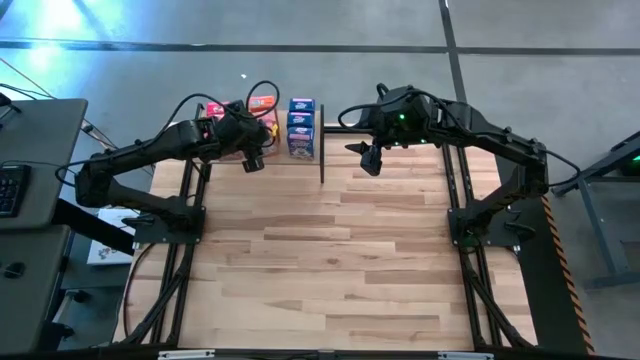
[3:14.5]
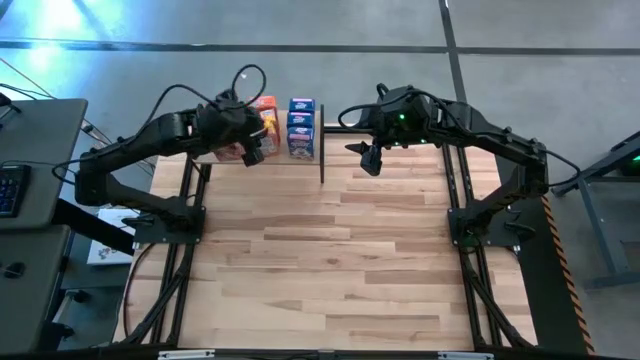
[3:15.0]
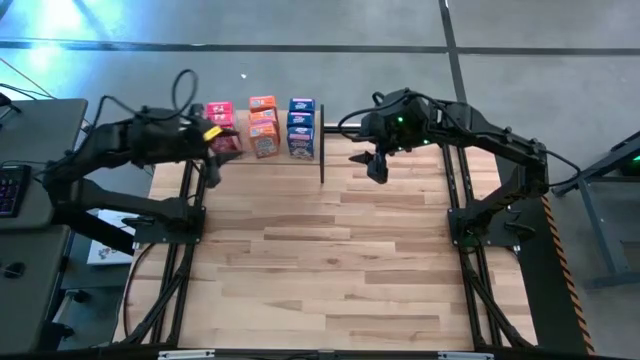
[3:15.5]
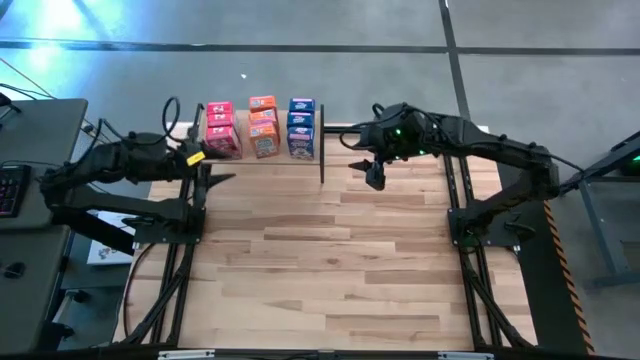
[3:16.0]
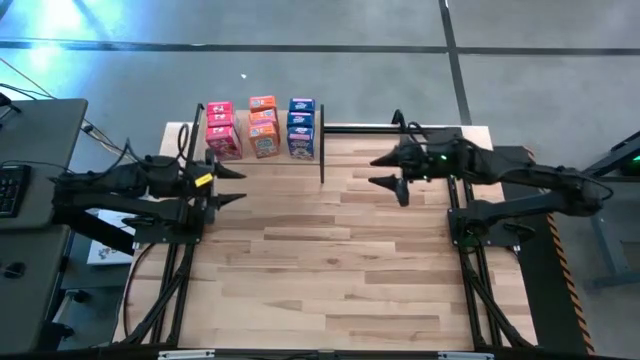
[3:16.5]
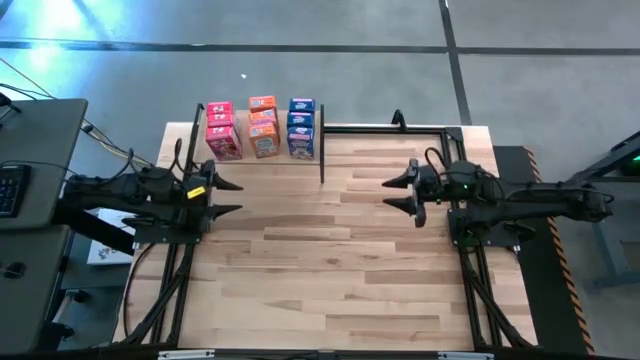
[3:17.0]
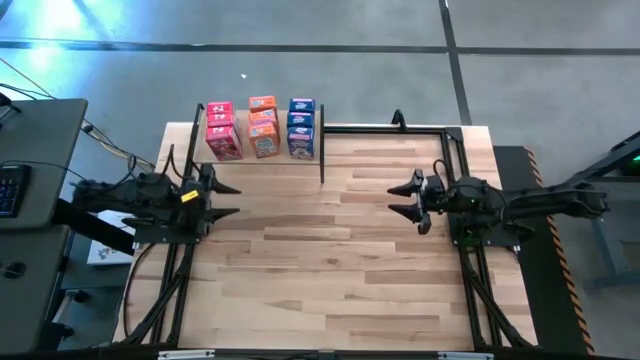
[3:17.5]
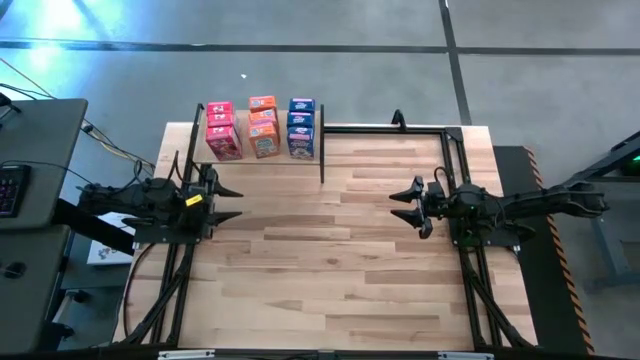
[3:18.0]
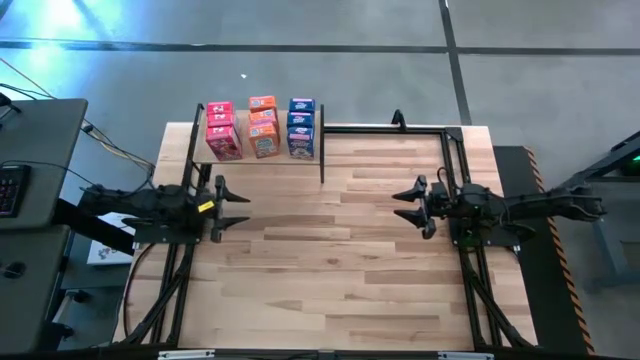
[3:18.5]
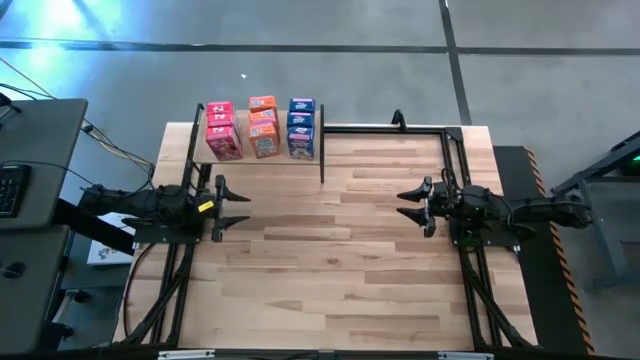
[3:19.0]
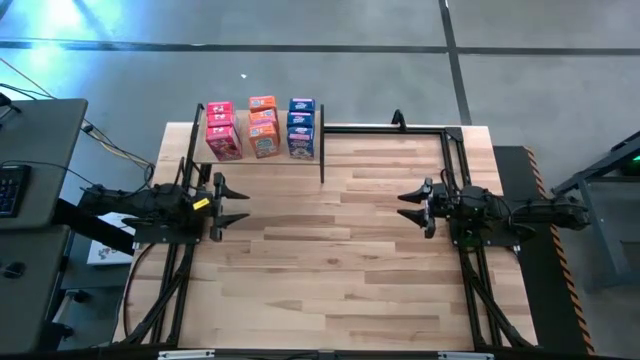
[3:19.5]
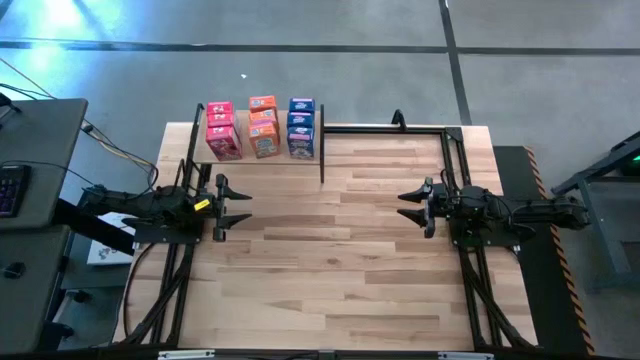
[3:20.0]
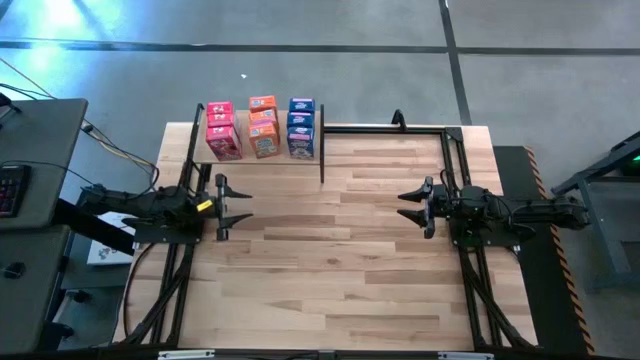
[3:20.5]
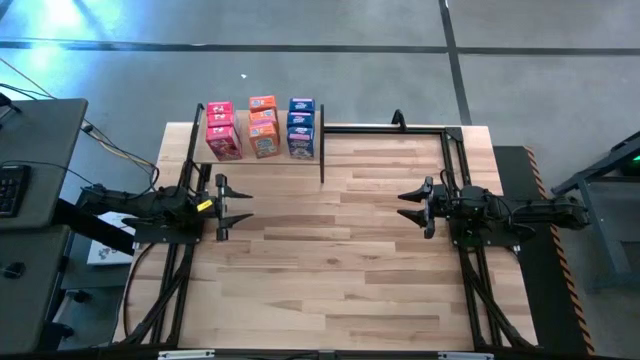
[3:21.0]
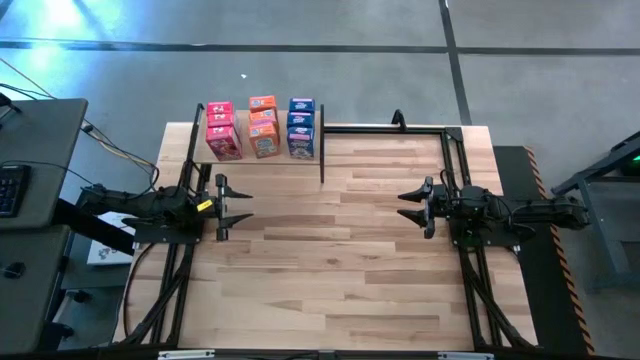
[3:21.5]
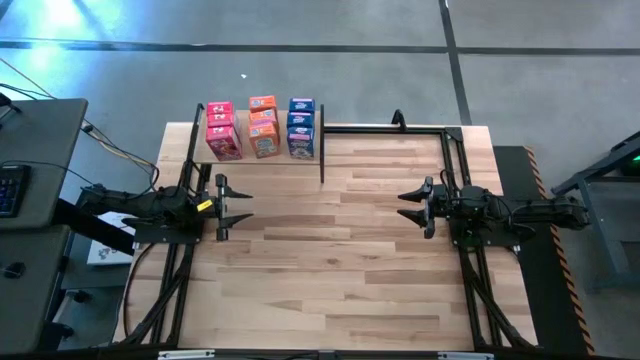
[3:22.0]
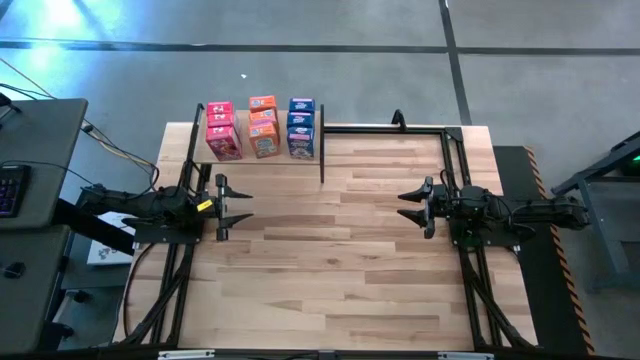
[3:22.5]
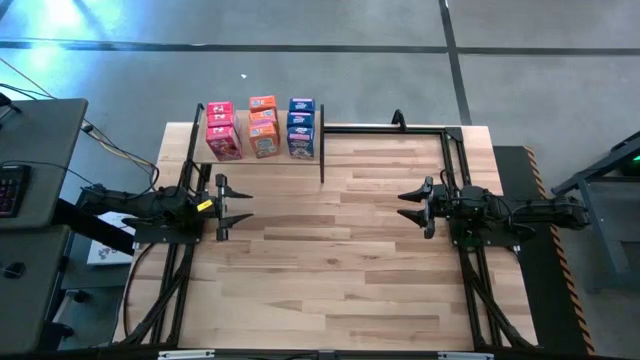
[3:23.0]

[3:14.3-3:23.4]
Task: Stack cereal on shelf
Return to Home Position

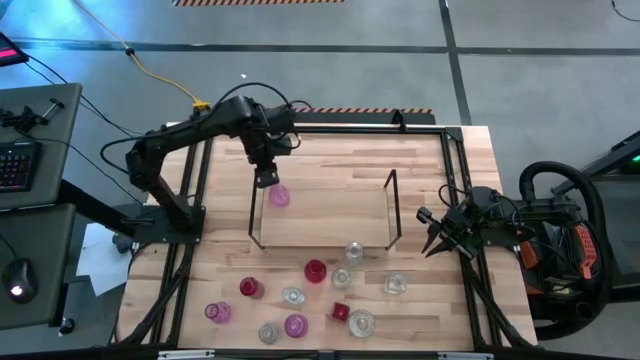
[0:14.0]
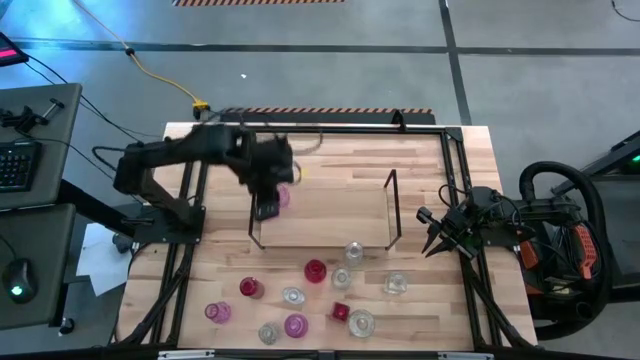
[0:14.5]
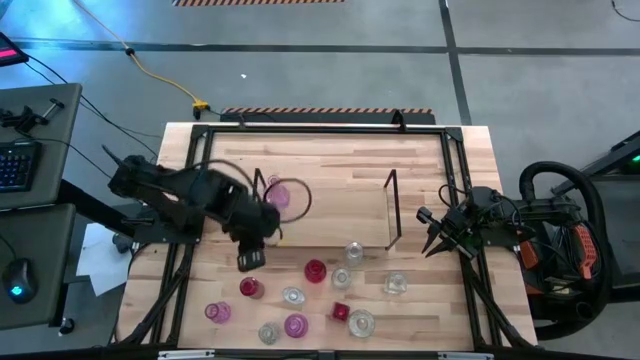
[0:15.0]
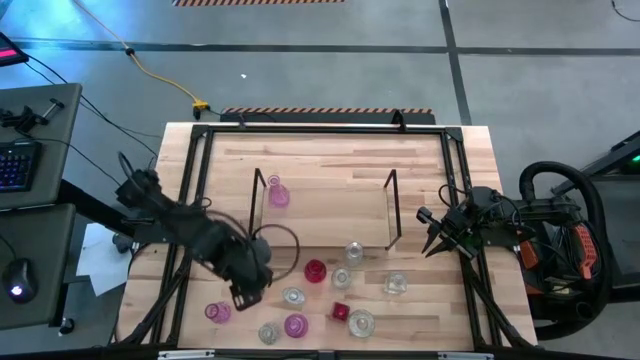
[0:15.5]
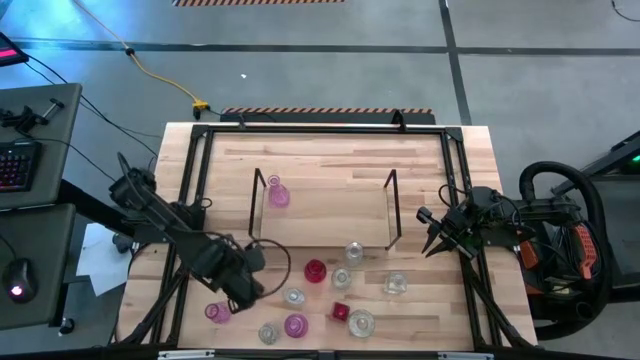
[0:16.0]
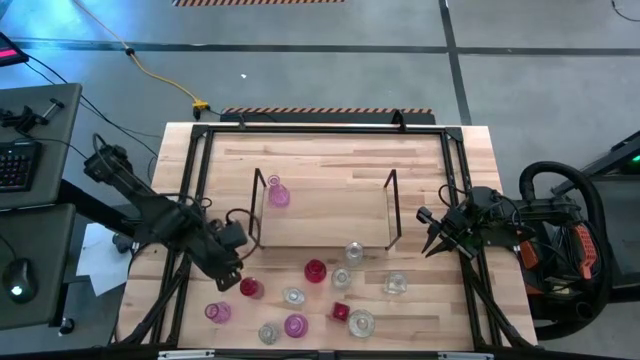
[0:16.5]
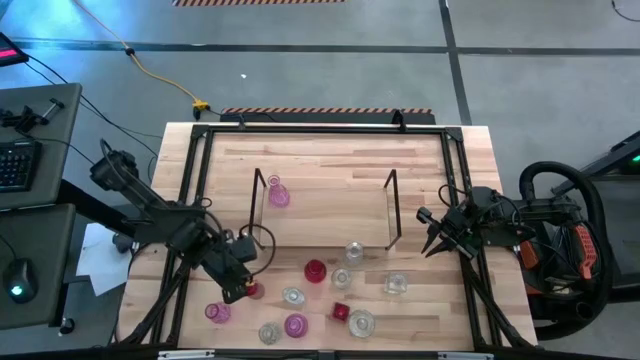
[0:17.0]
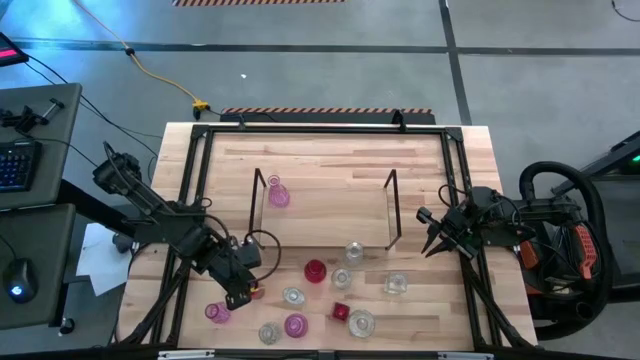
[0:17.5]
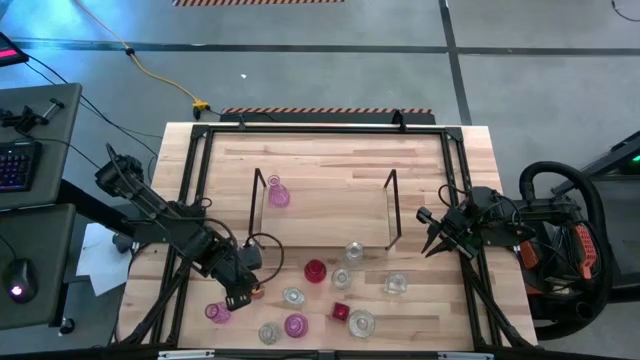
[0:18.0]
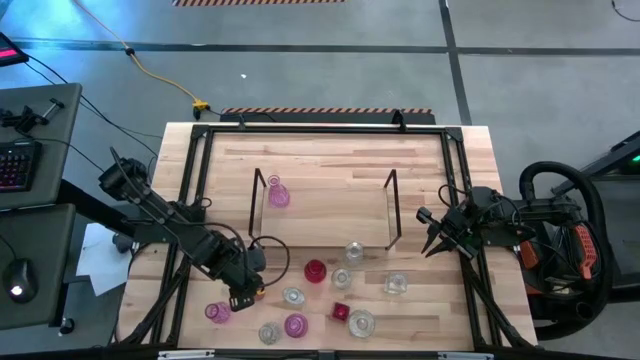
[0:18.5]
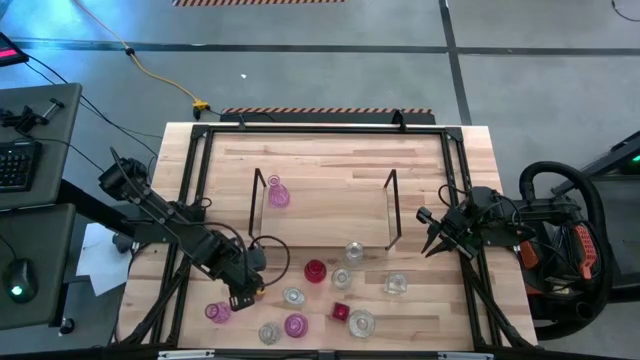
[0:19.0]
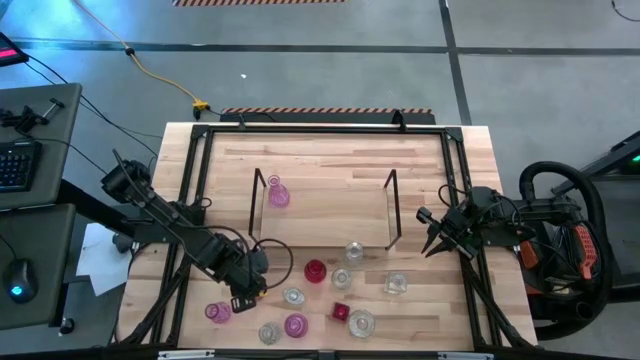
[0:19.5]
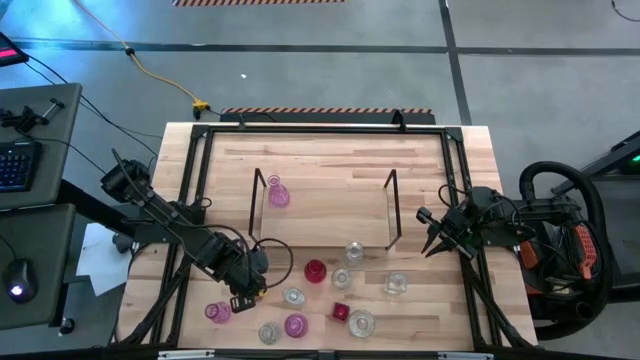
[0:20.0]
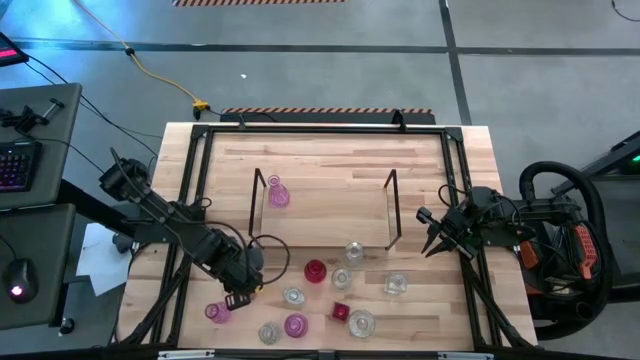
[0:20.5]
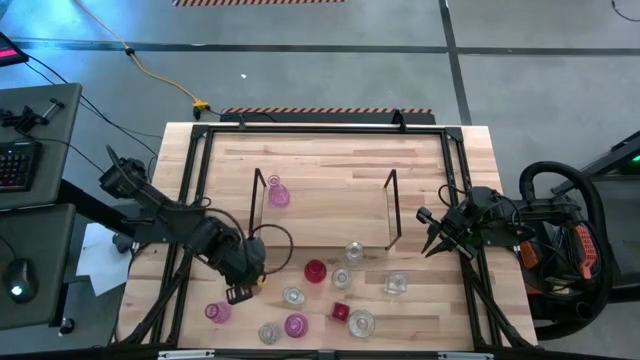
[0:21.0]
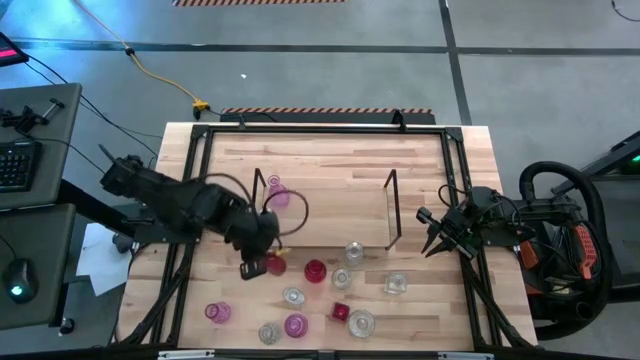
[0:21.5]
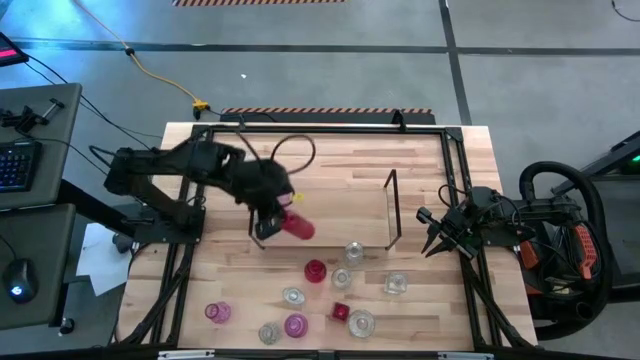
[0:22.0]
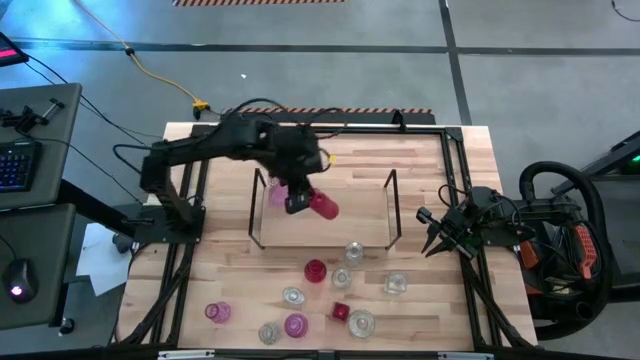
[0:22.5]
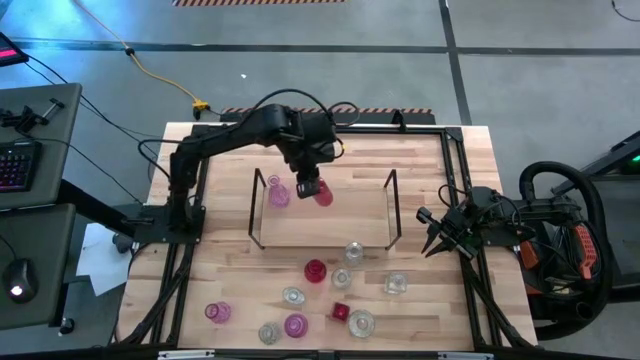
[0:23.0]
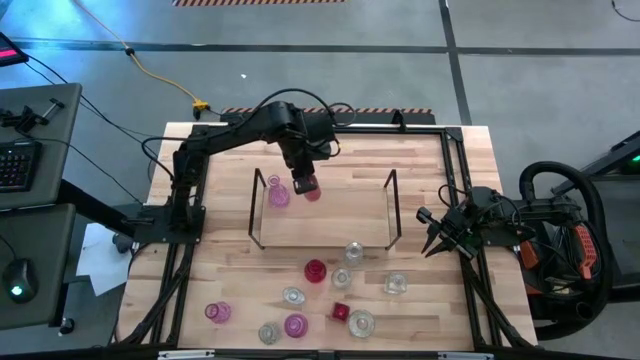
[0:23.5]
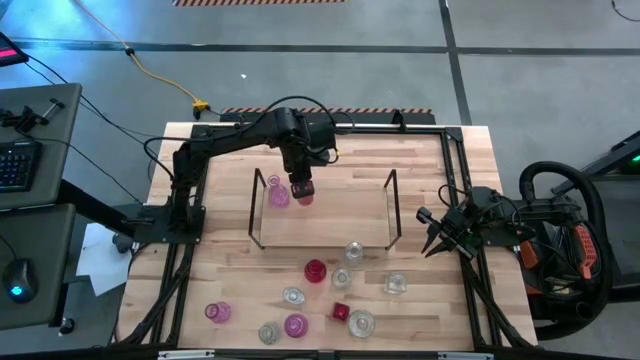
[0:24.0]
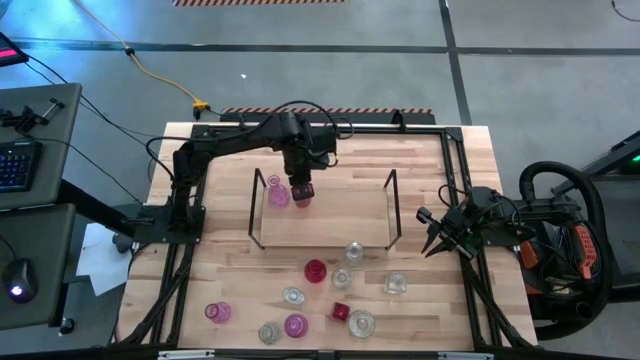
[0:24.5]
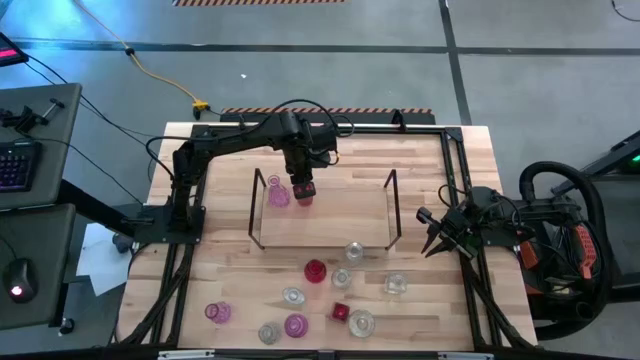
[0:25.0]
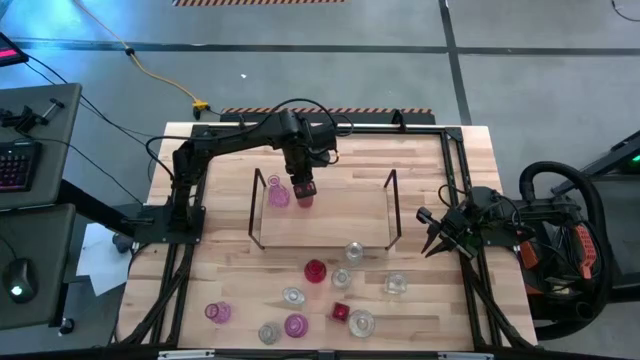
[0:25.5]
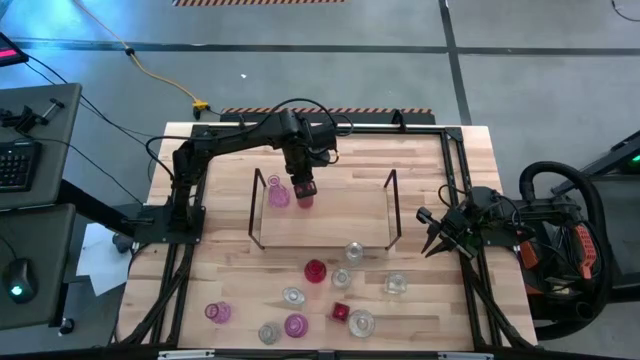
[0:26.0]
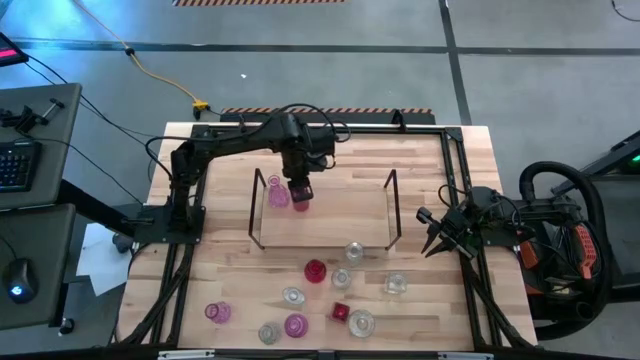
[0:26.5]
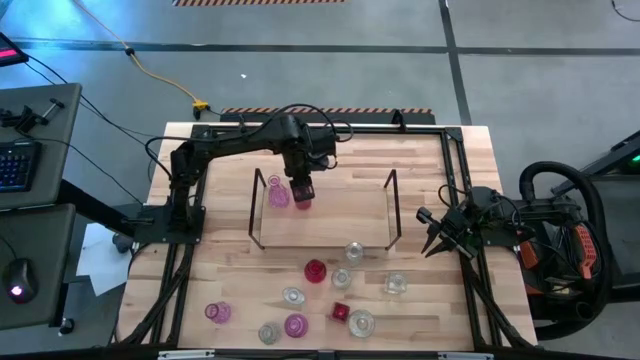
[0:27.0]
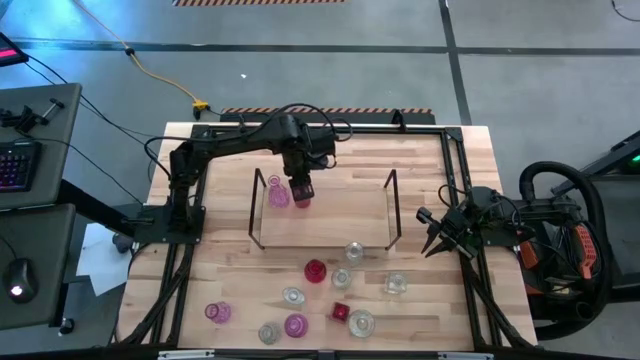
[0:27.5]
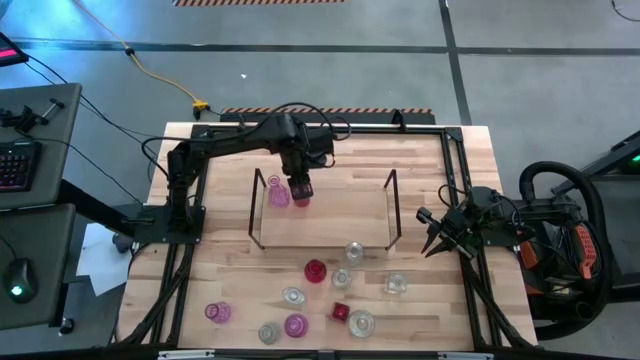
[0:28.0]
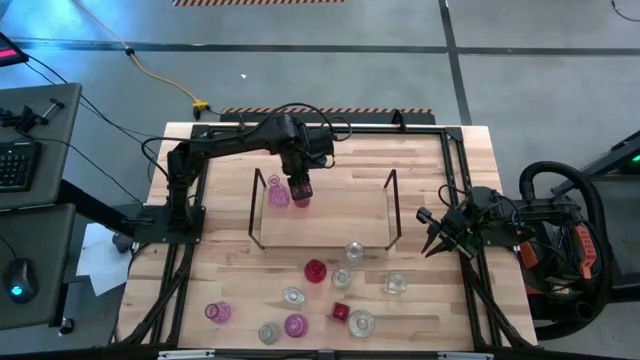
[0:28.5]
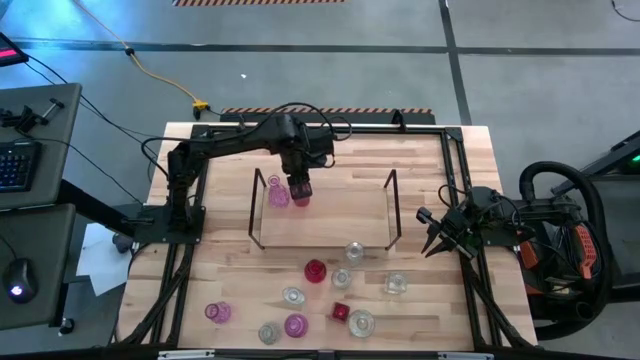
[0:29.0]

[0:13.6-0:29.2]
Task: sort vases onto shelf
Put the red vase on the shelf
